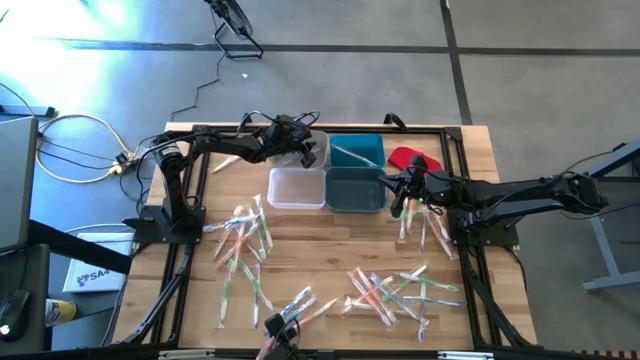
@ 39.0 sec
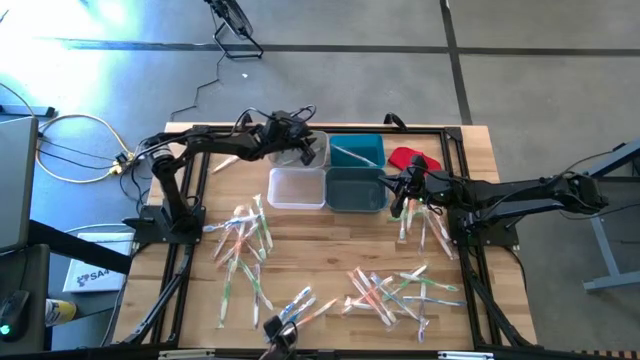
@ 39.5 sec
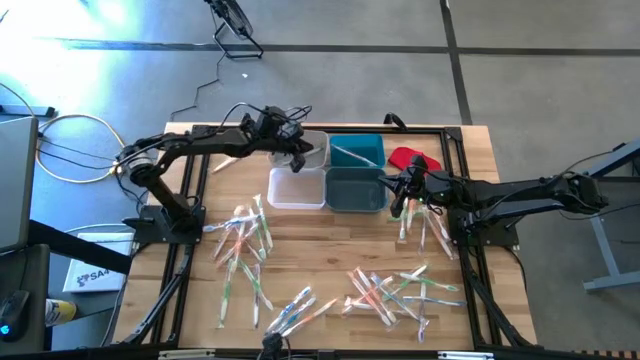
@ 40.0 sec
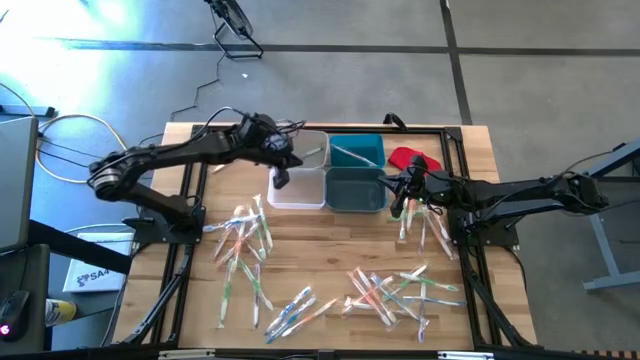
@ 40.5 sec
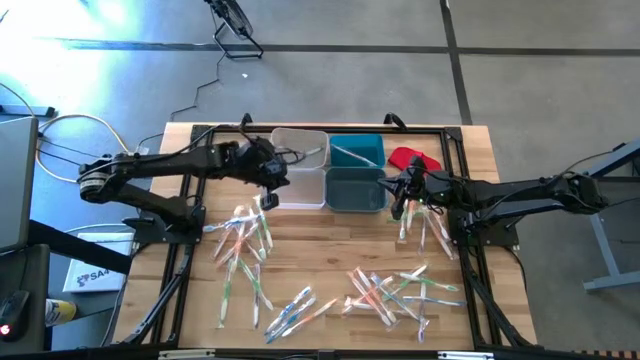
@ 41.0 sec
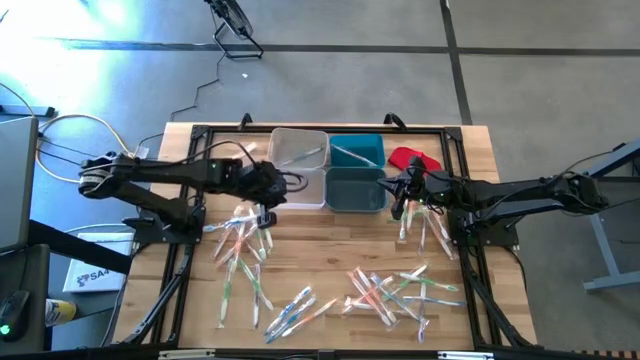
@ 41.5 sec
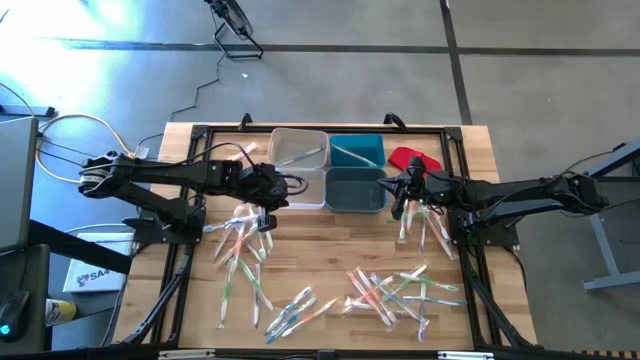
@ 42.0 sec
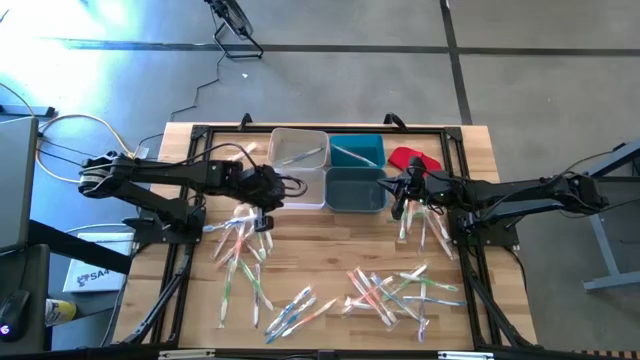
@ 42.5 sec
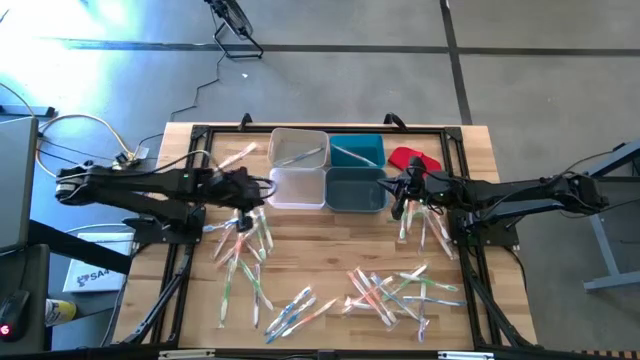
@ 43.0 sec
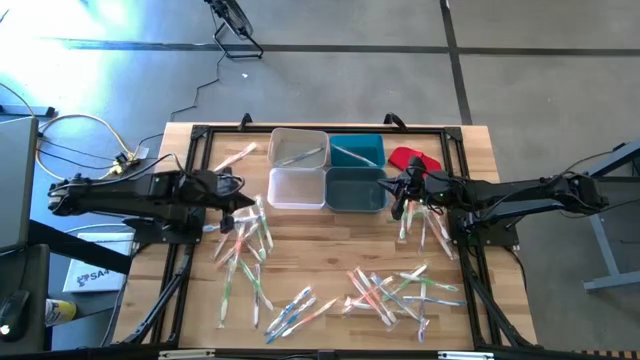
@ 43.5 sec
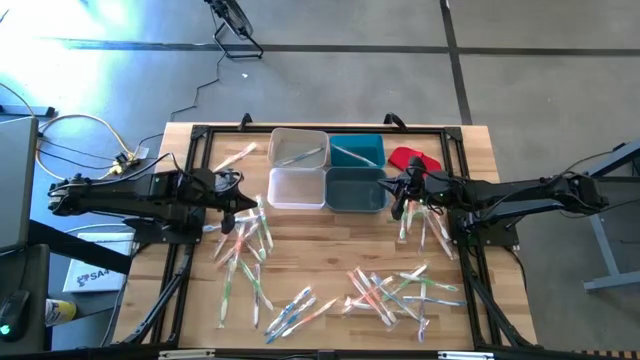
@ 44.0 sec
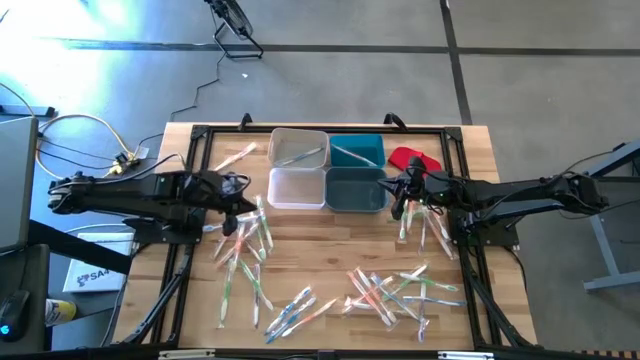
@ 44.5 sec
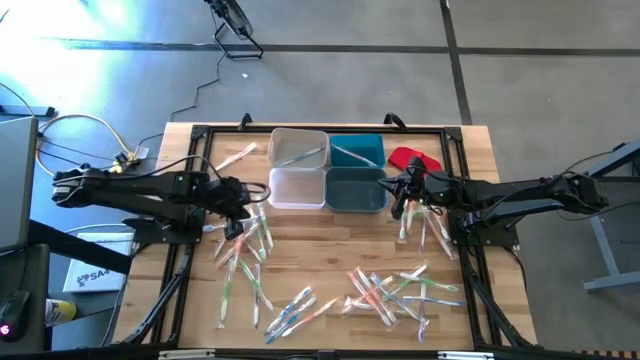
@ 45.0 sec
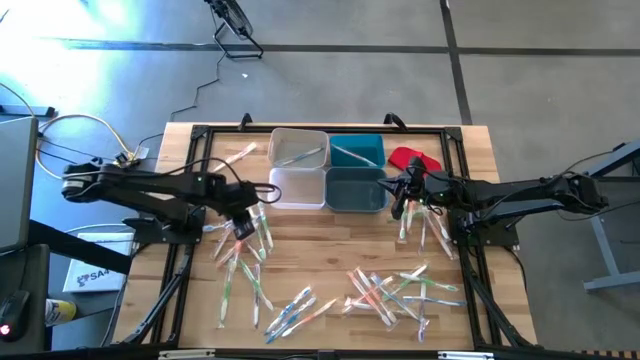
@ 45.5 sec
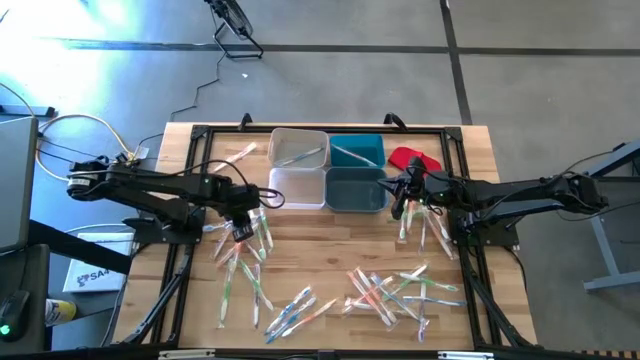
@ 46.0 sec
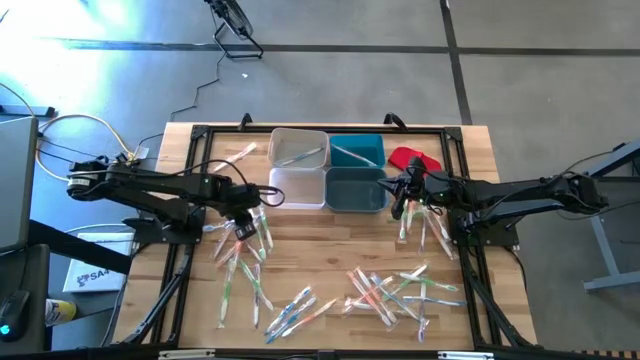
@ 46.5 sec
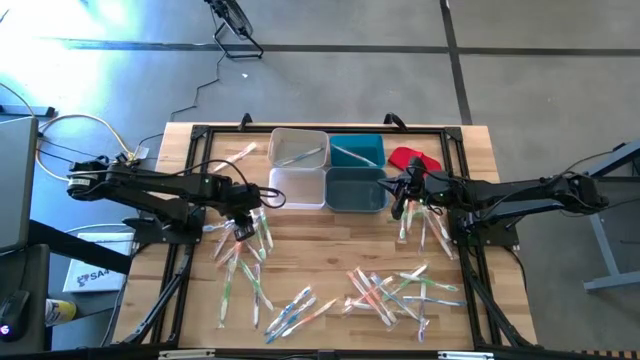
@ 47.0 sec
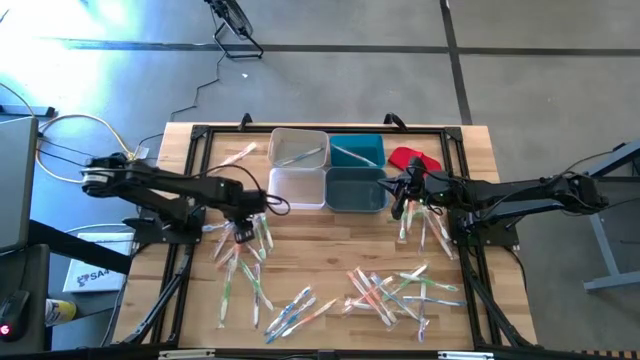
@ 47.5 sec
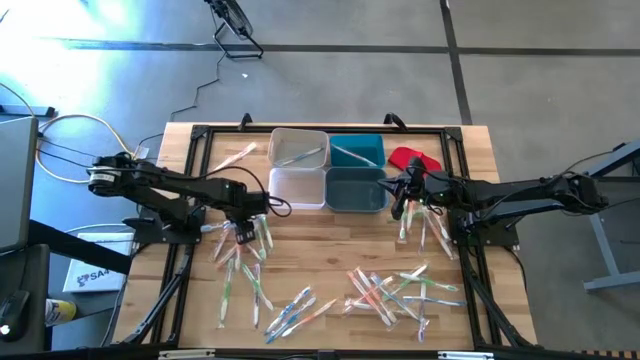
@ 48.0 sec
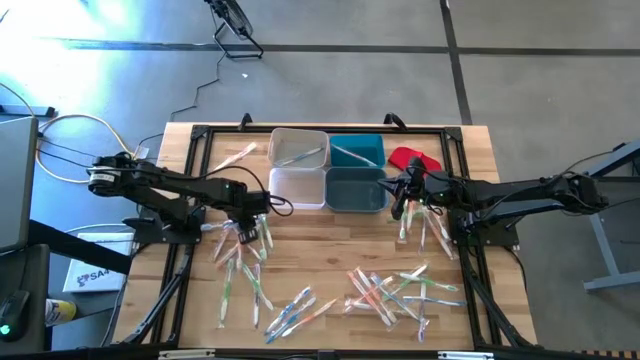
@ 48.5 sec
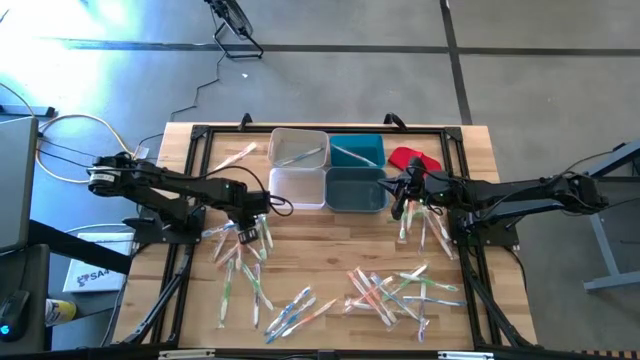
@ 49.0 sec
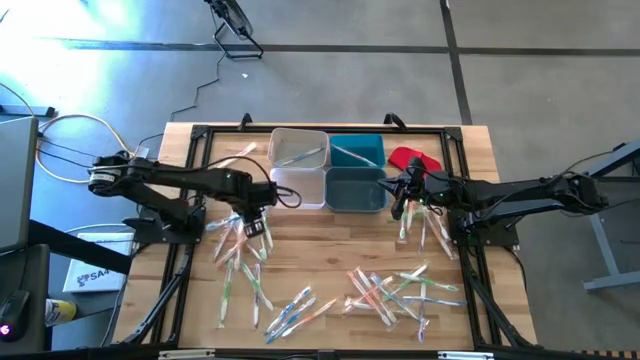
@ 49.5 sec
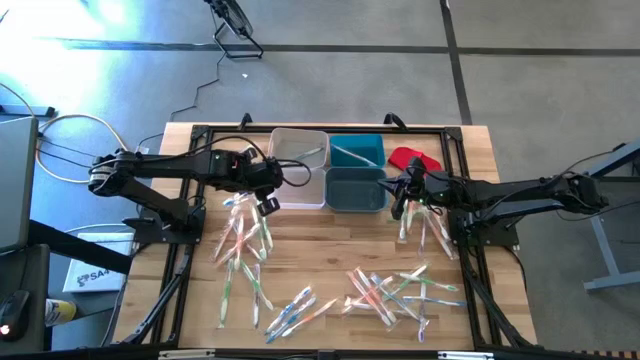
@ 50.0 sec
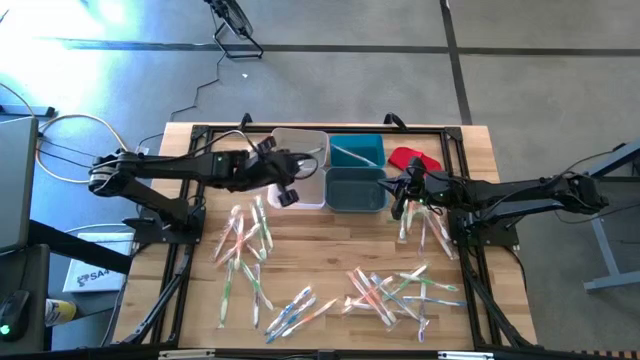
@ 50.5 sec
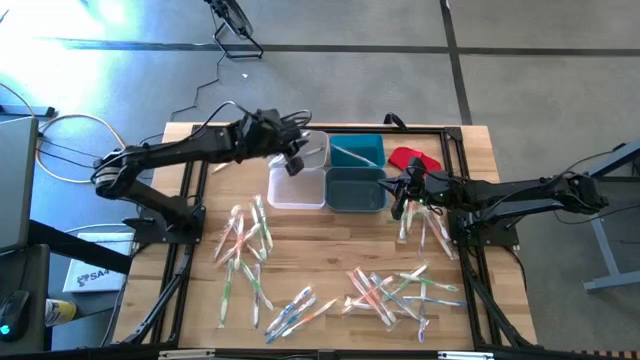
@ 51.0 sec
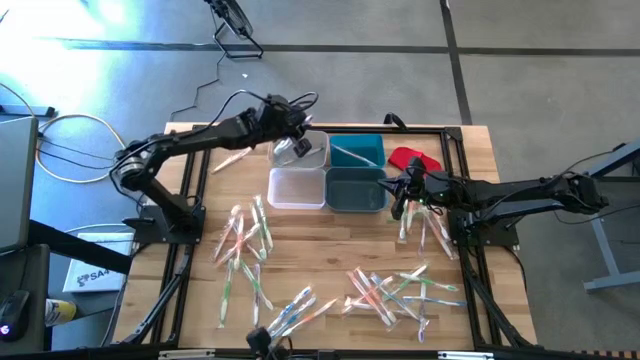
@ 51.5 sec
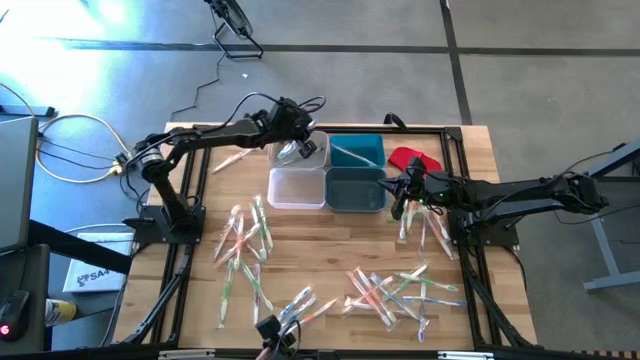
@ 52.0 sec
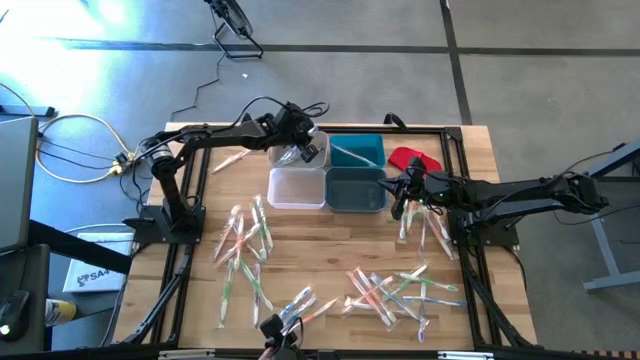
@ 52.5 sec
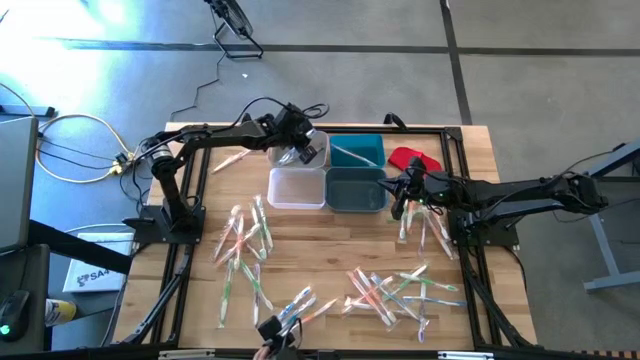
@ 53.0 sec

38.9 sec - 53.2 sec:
Task: Pick & Place Toothbrushes
Put the blue toothbrush into the white bin

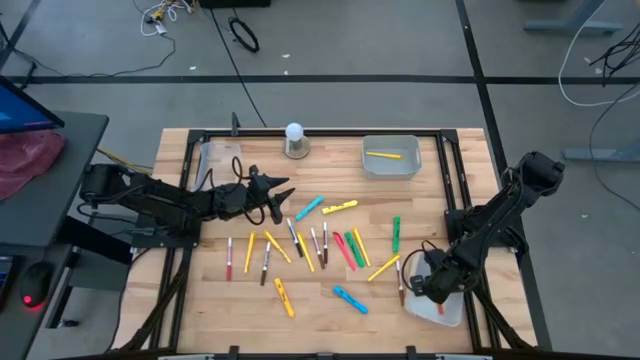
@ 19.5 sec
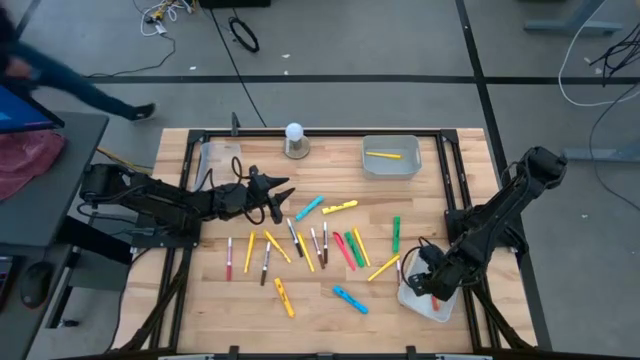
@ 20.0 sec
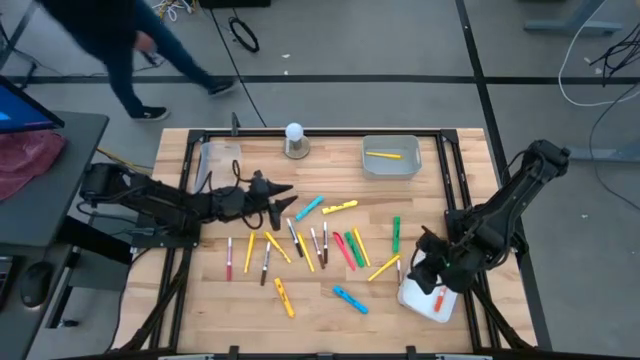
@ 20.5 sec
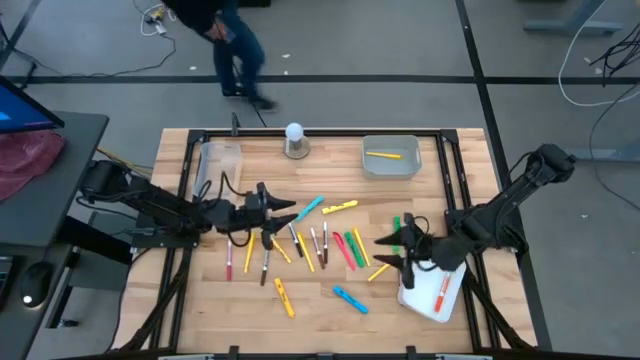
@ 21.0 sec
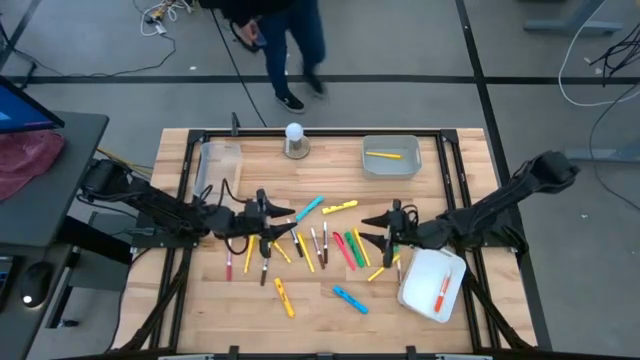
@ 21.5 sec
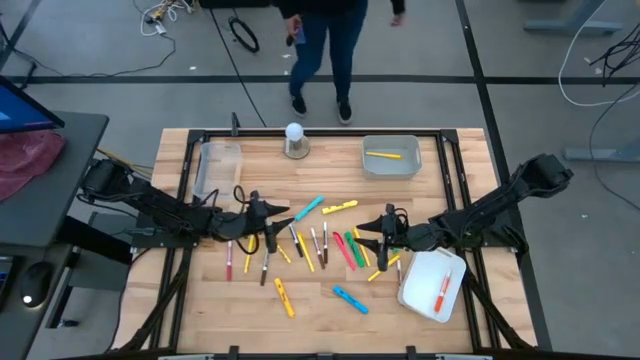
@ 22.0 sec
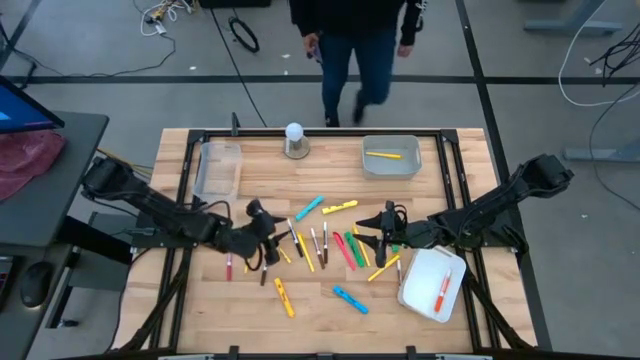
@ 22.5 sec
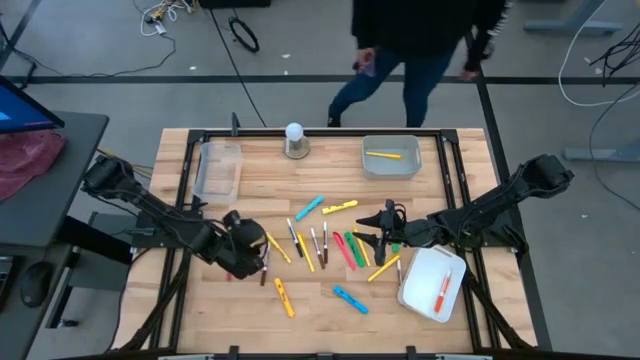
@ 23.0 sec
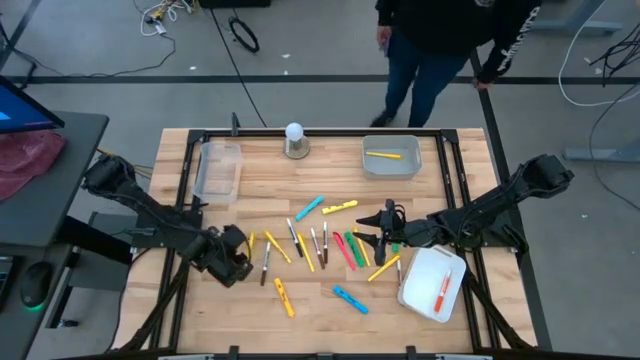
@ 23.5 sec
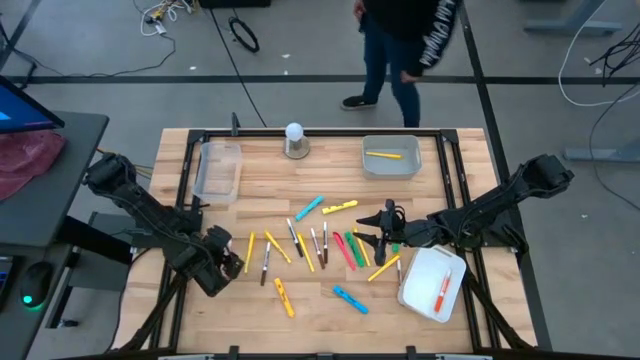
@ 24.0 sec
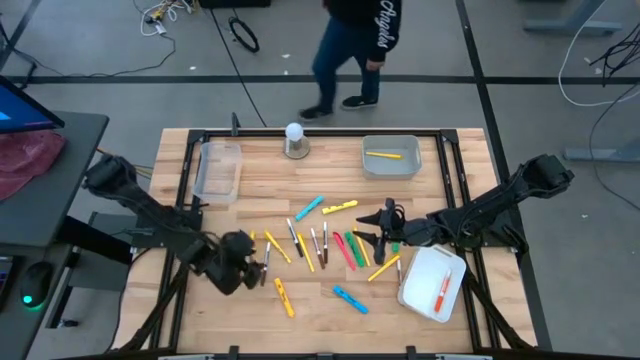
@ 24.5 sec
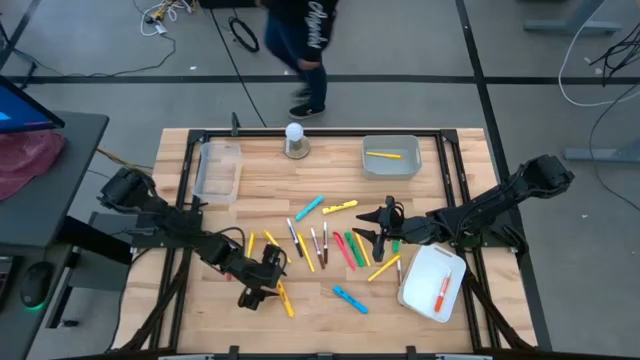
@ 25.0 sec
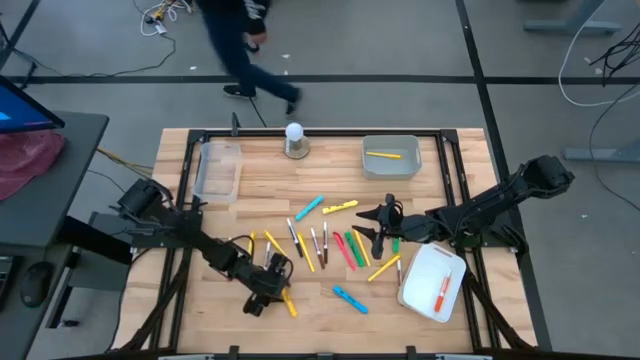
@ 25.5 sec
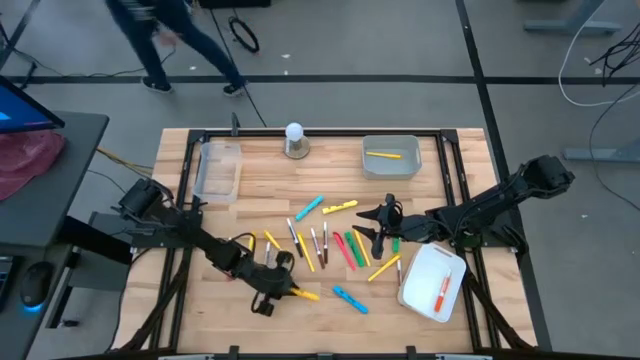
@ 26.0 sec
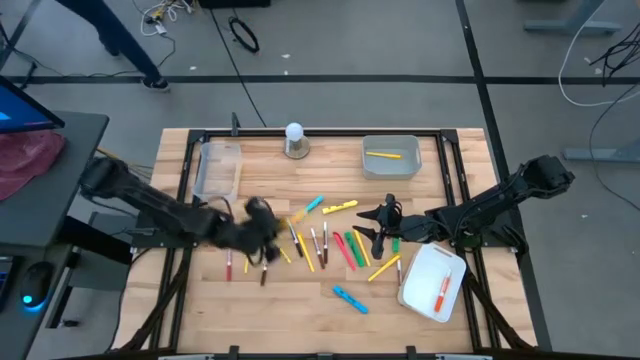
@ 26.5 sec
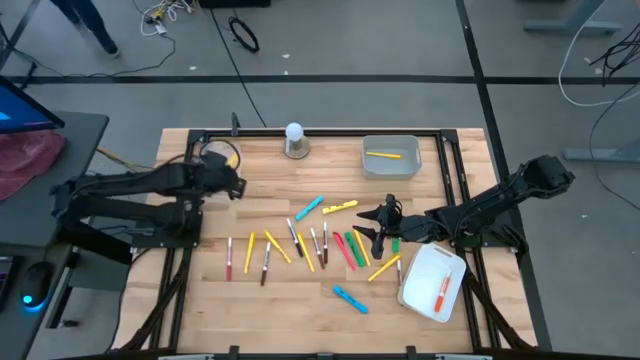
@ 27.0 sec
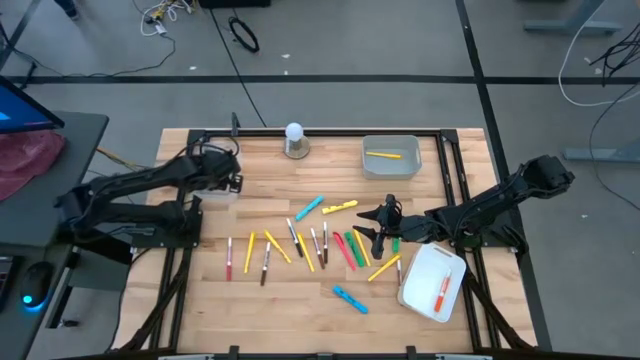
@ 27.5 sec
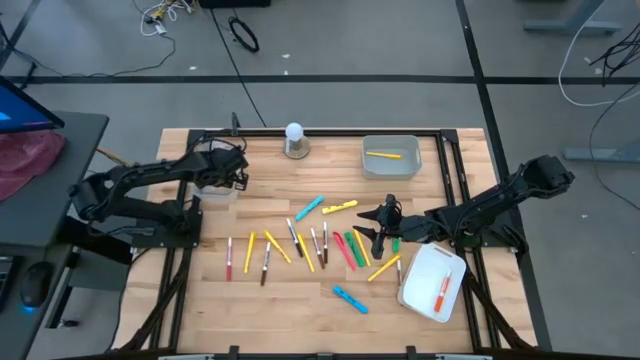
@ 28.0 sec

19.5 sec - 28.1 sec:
Task: Pick & Place Markers
Put the yellow highlighter into the transparent bin
